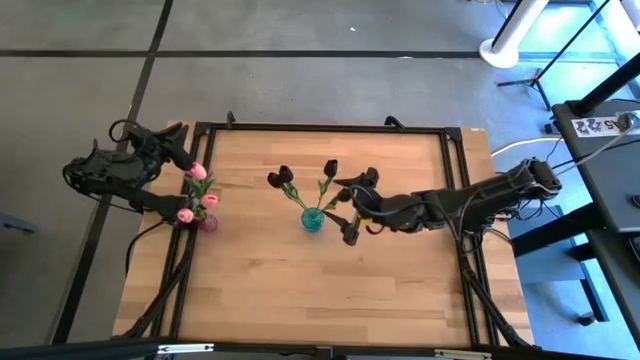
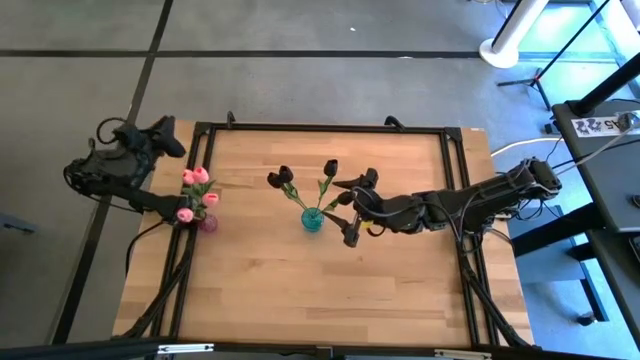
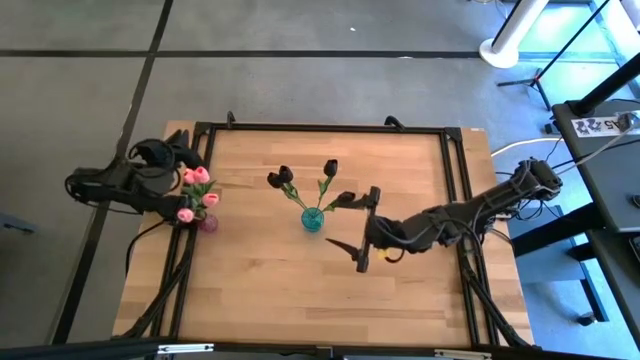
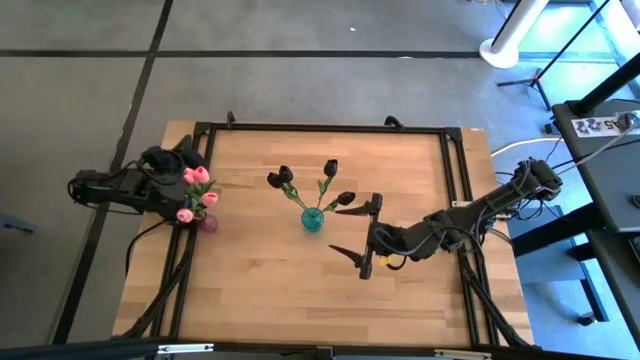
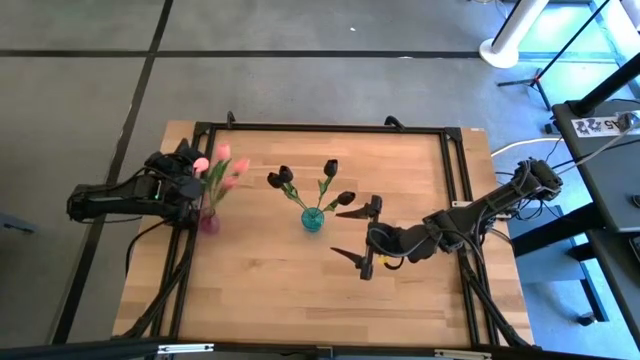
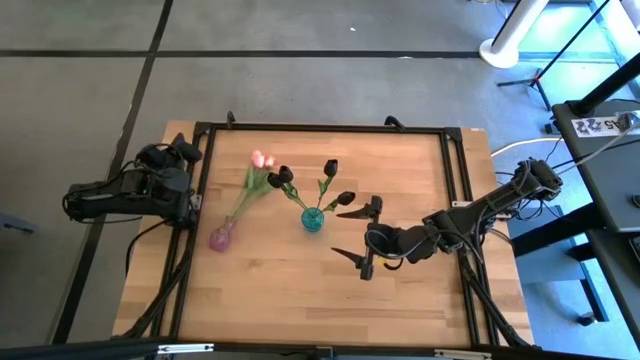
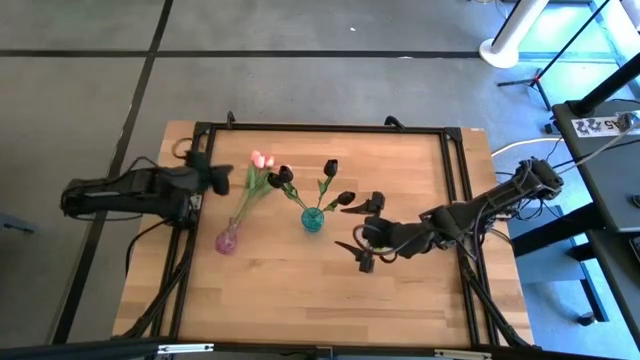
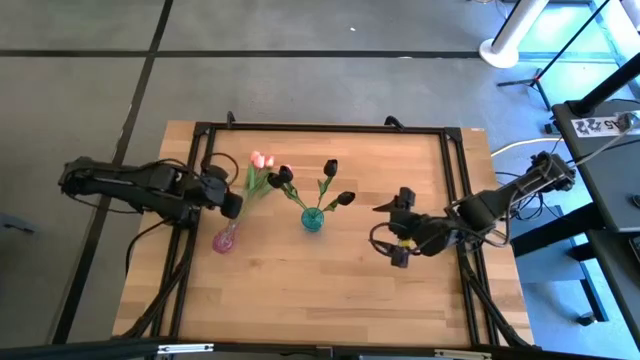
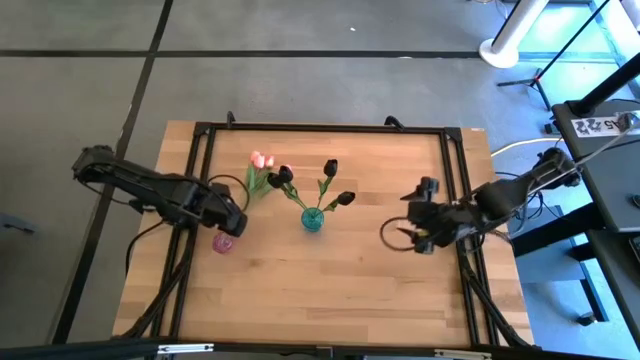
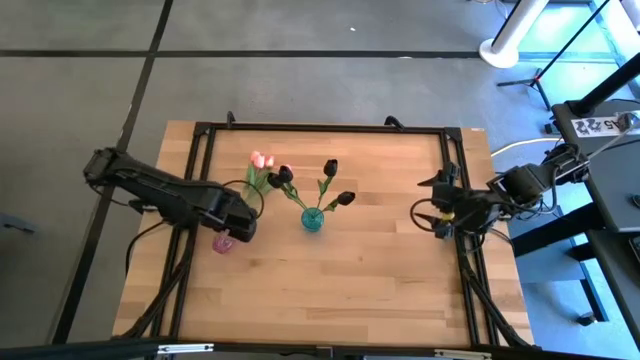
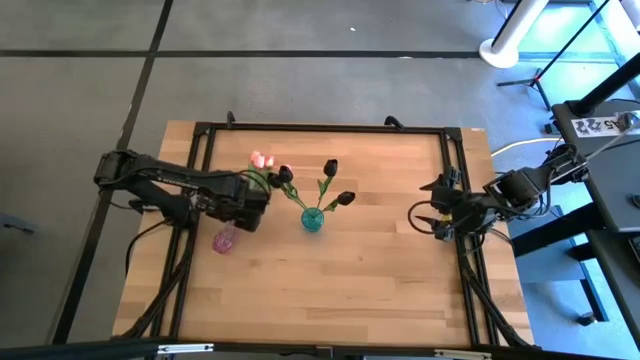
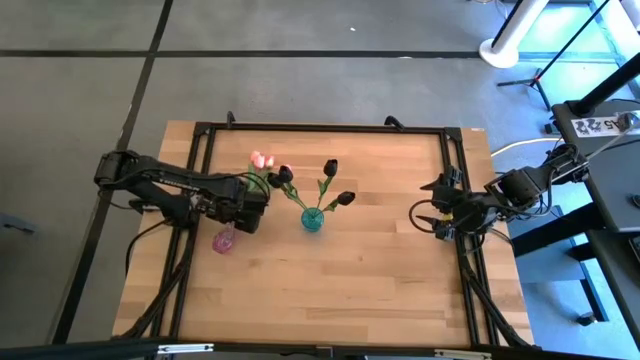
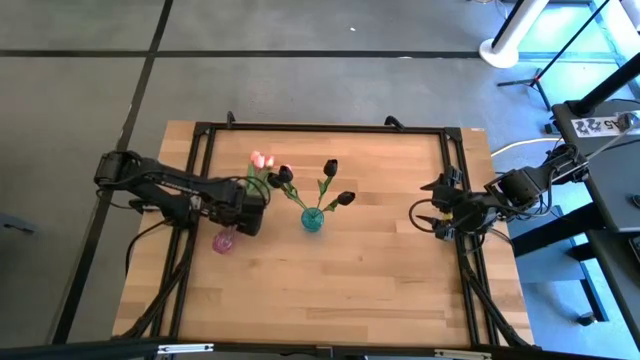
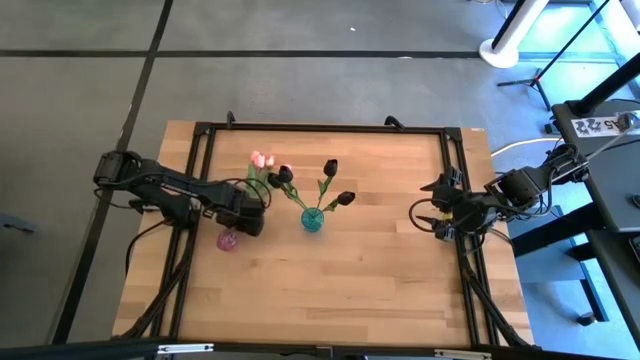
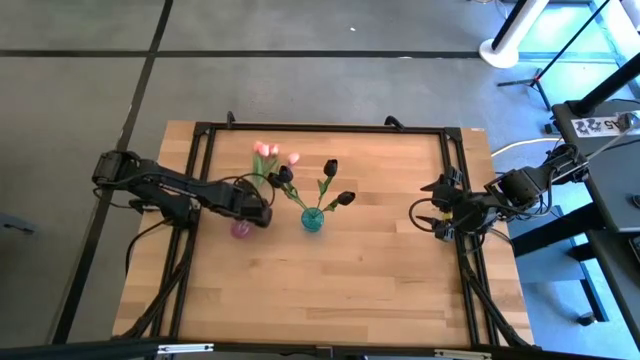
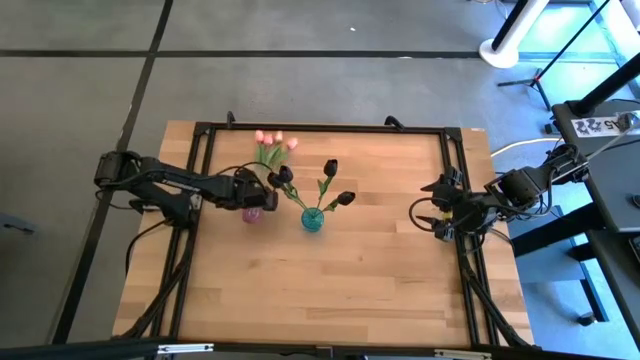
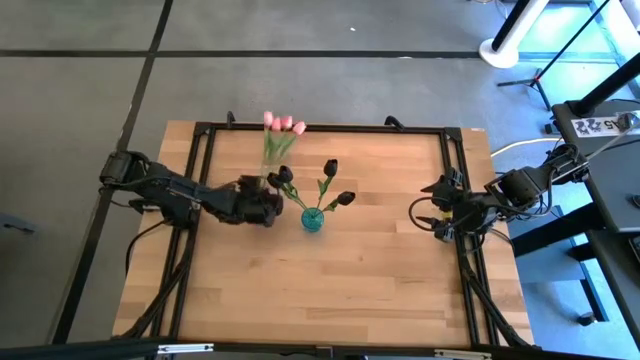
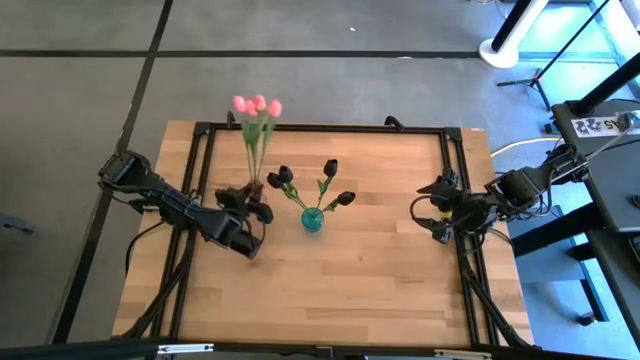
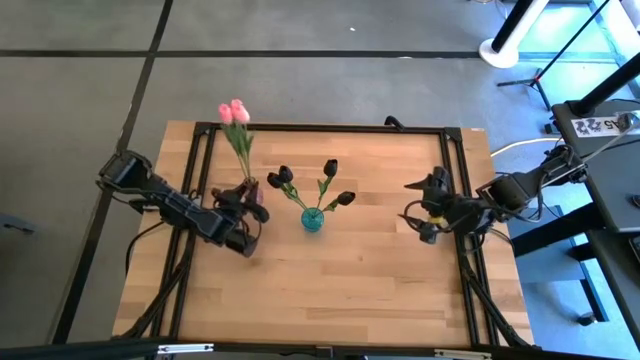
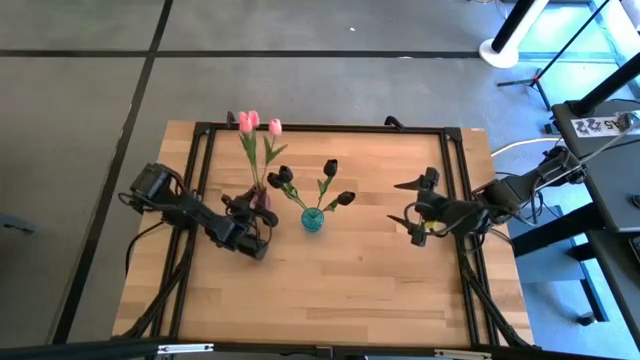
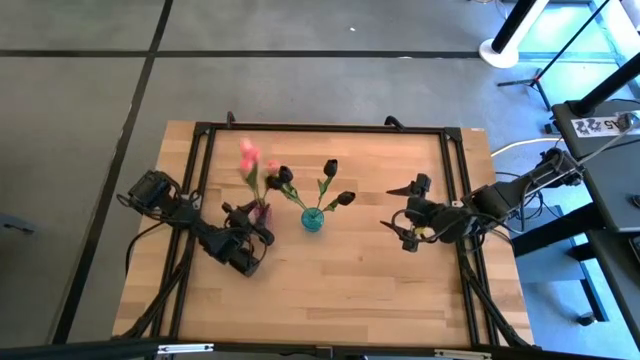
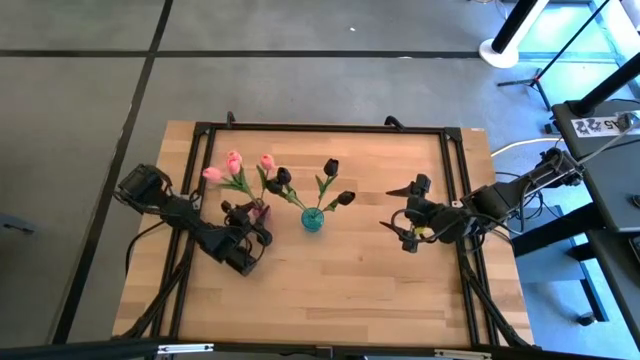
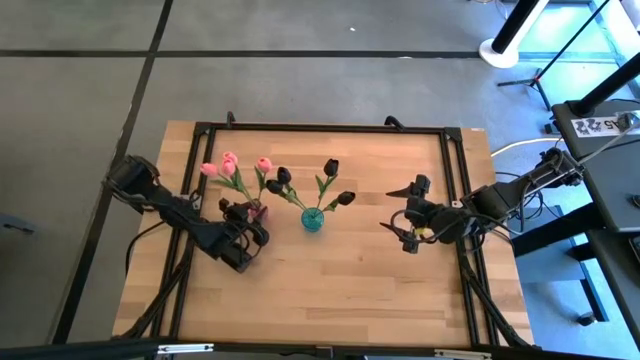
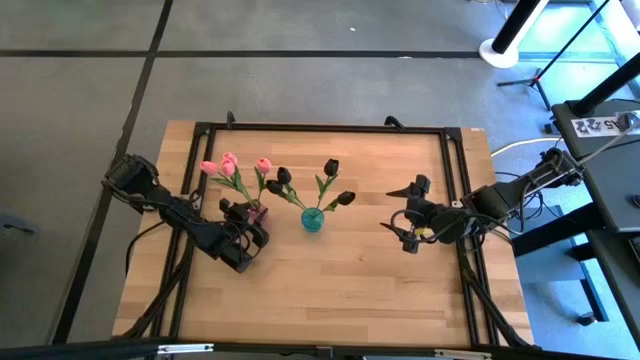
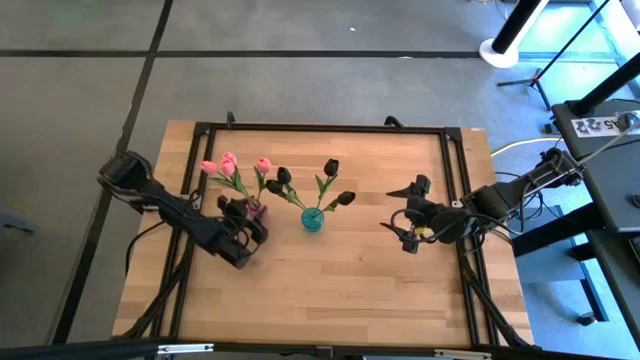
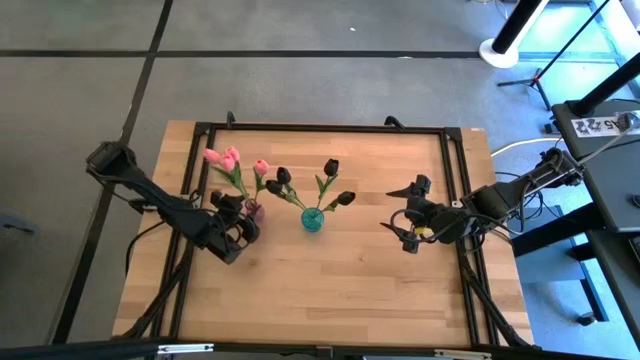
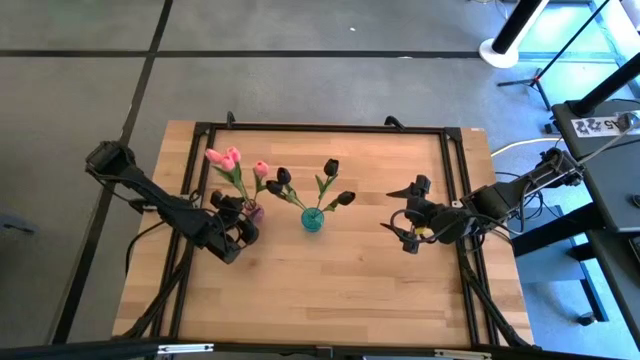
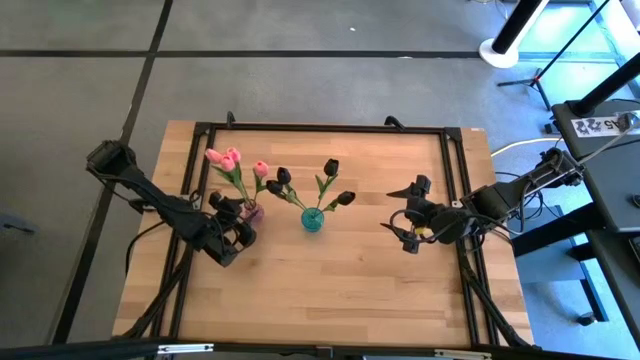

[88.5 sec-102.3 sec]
Task: Sort flowers into vase by color
Adjust the pink vase

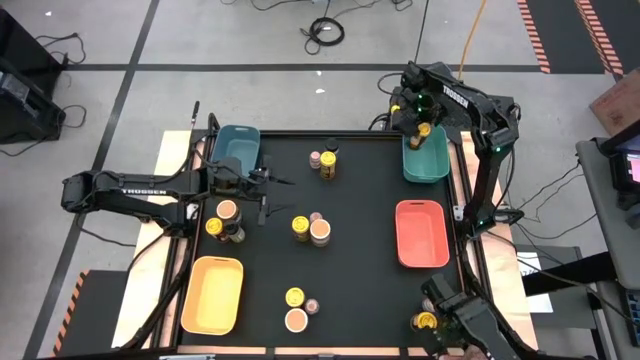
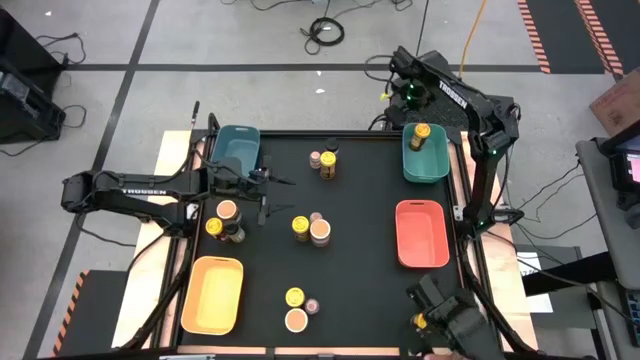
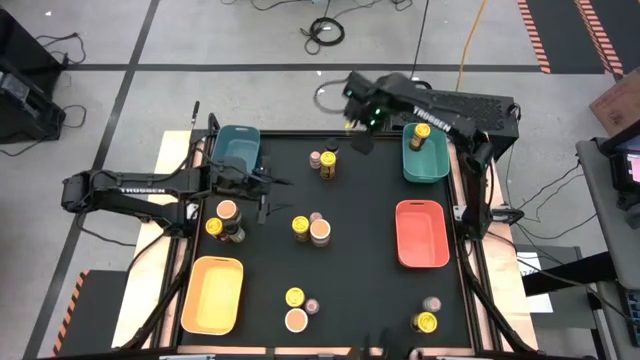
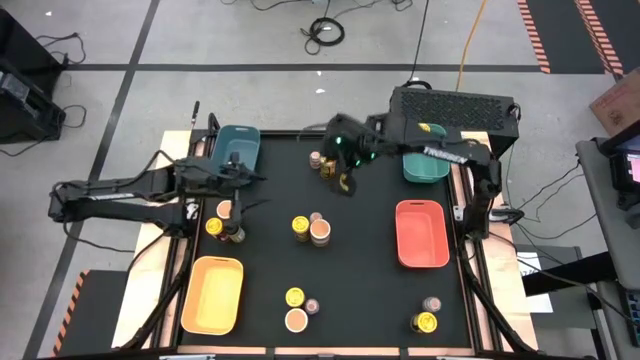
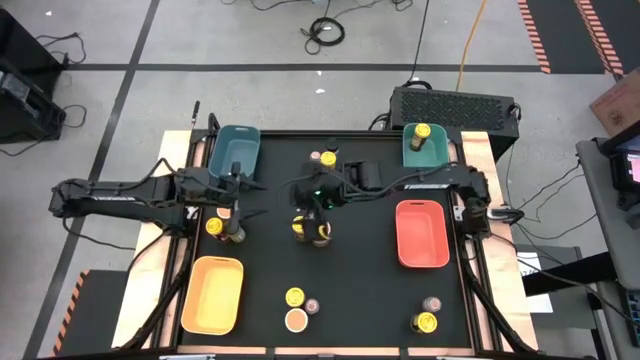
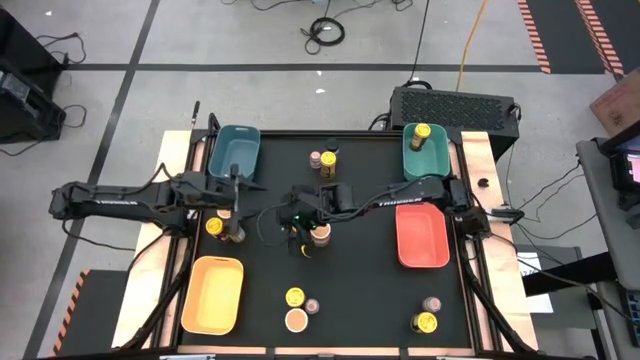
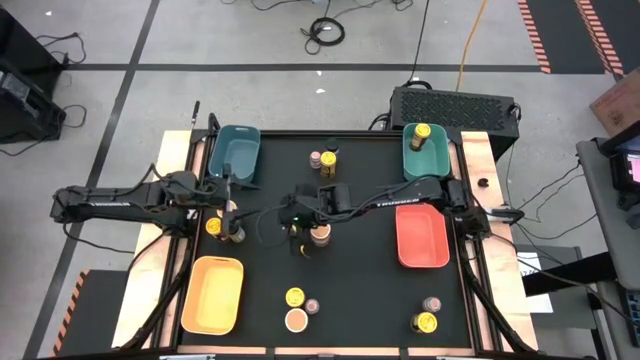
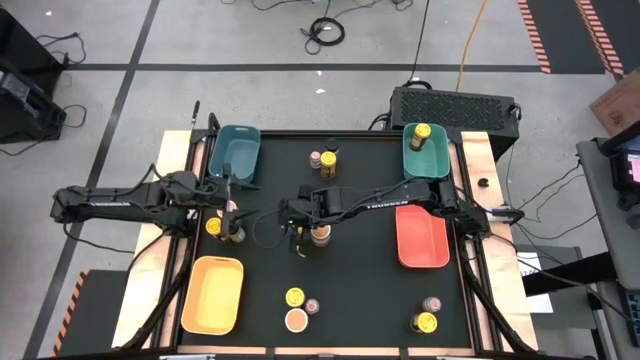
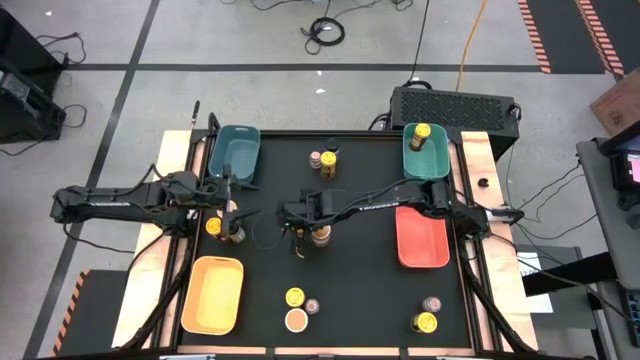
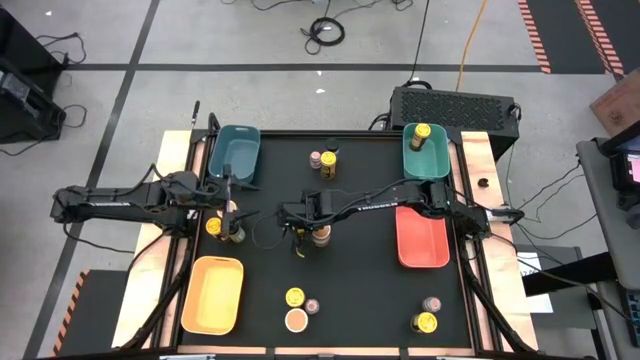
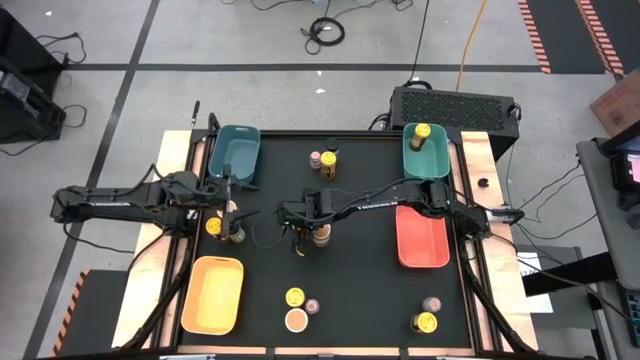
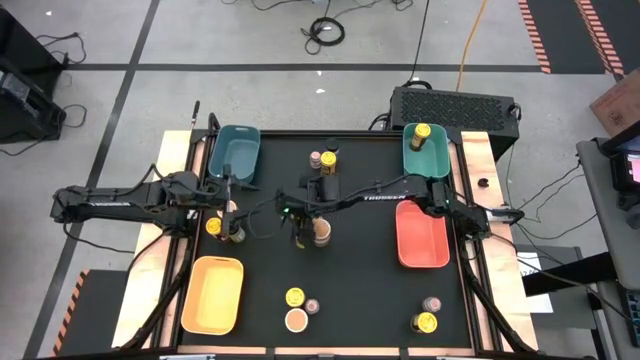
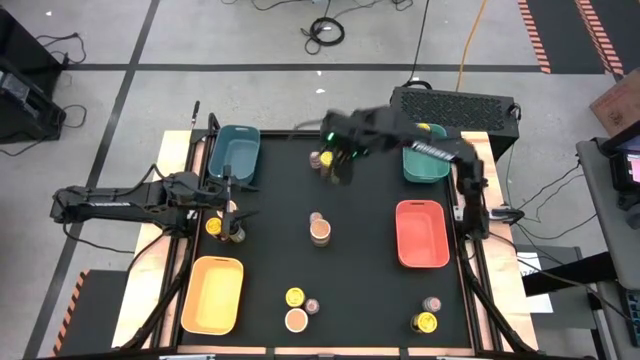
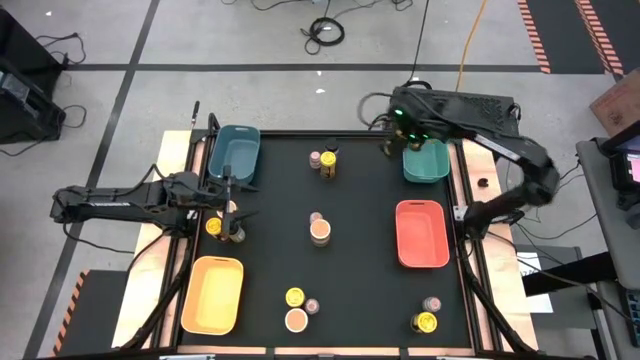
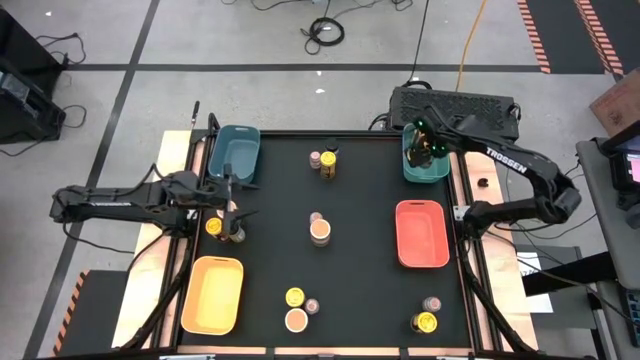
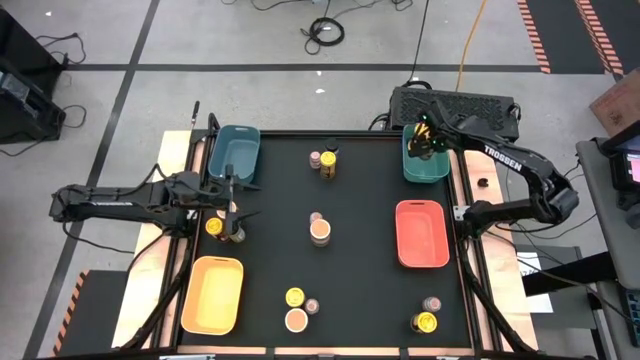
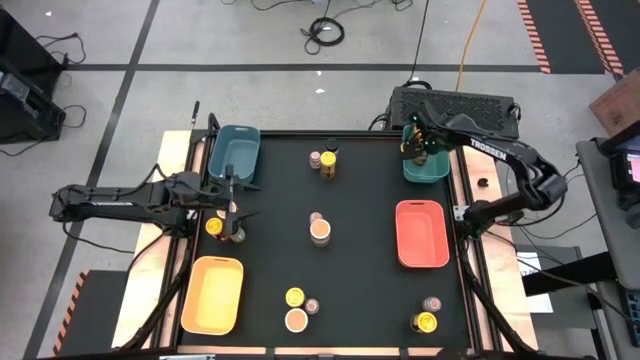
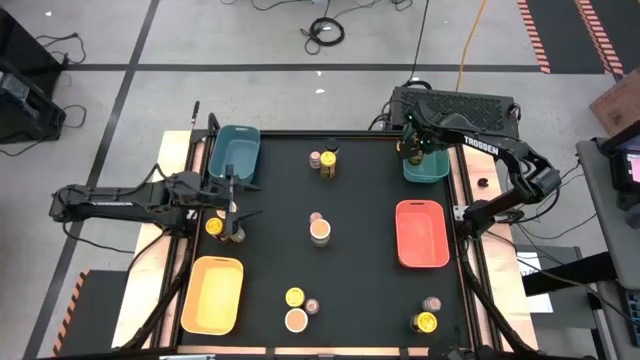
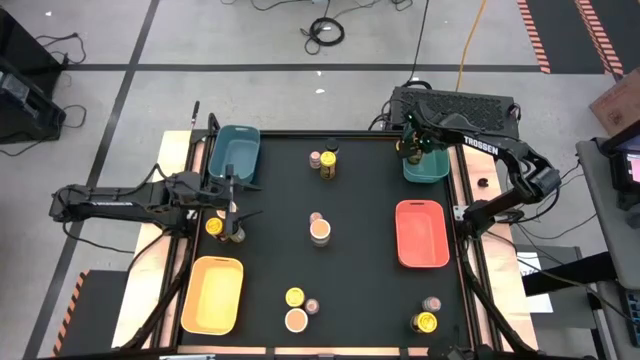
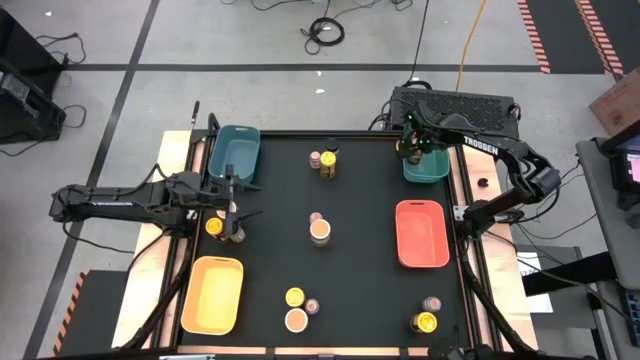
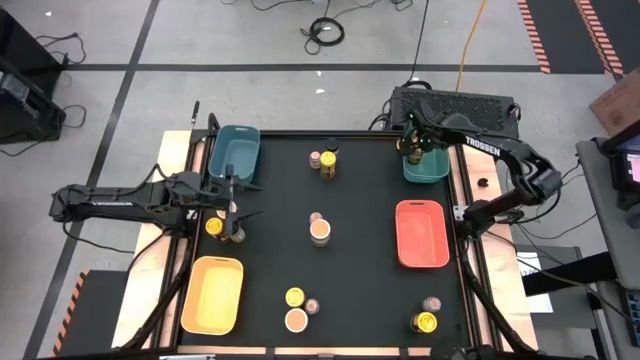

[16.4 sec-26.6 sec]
Task: Sort spices by type
Put the yellow spice bottle into the green bin
